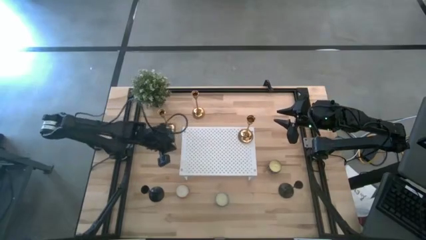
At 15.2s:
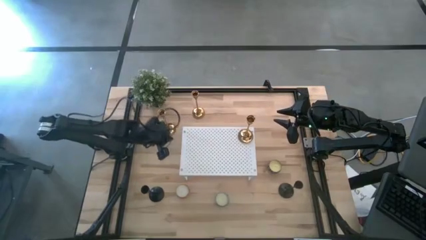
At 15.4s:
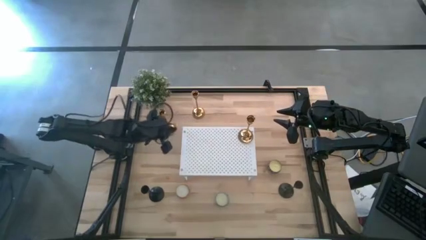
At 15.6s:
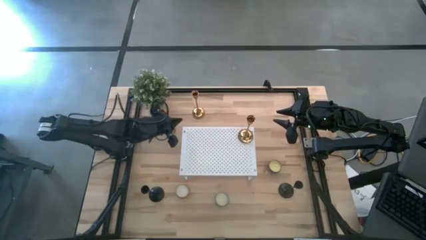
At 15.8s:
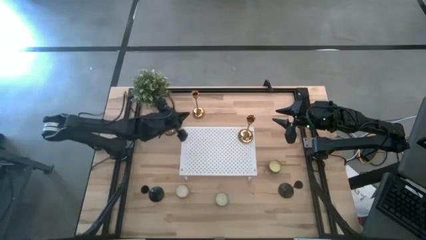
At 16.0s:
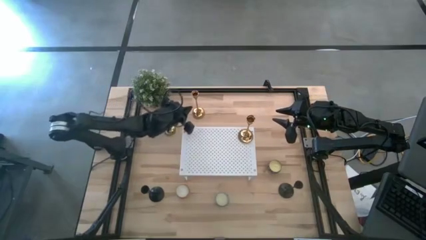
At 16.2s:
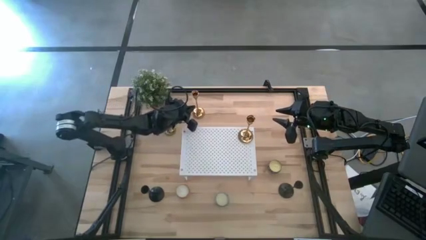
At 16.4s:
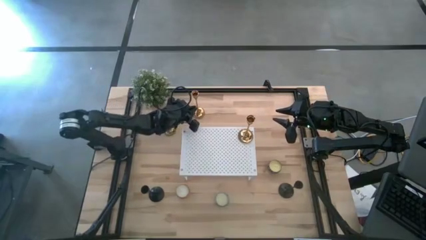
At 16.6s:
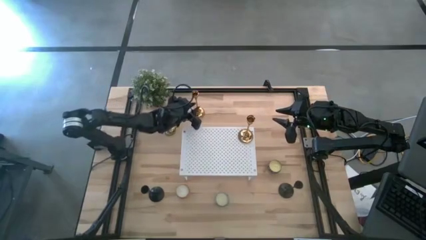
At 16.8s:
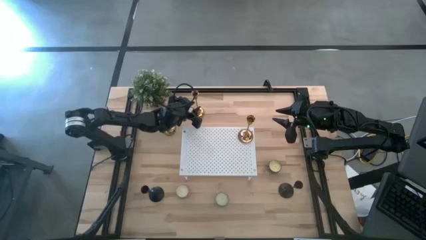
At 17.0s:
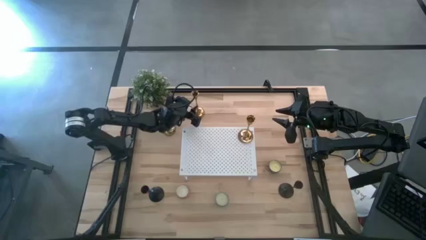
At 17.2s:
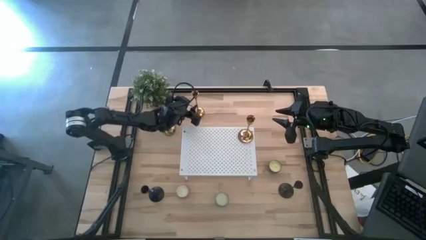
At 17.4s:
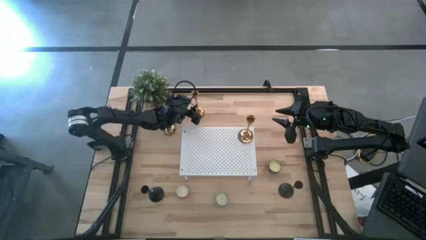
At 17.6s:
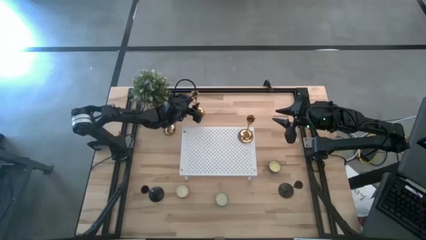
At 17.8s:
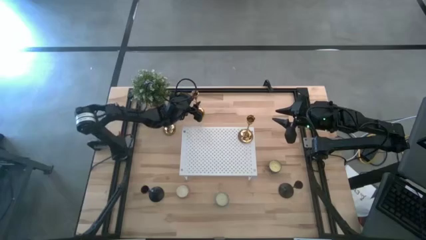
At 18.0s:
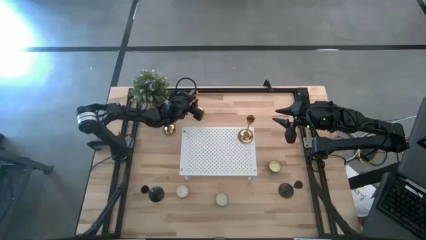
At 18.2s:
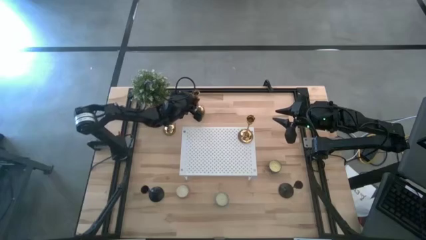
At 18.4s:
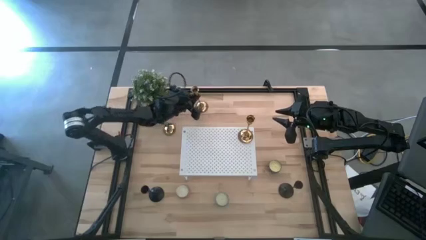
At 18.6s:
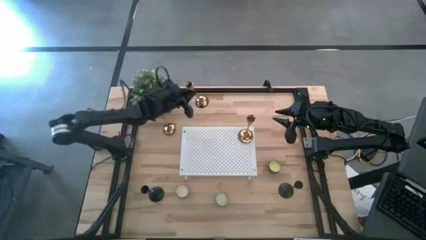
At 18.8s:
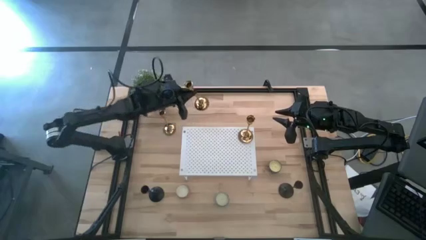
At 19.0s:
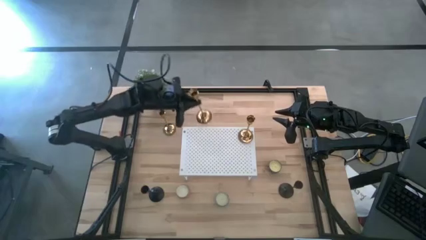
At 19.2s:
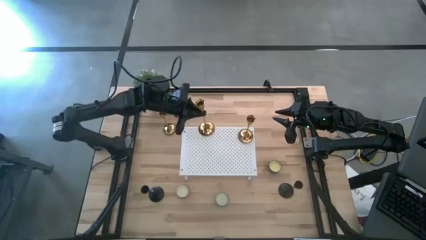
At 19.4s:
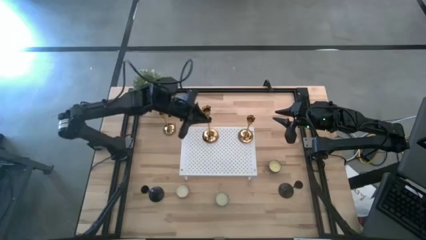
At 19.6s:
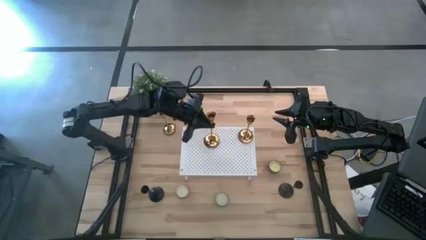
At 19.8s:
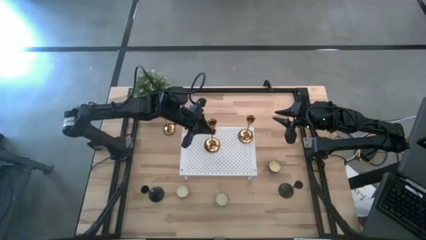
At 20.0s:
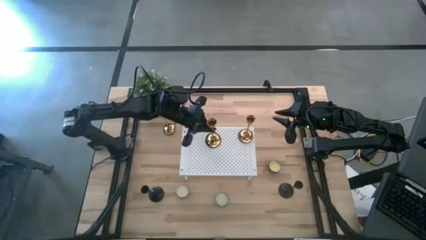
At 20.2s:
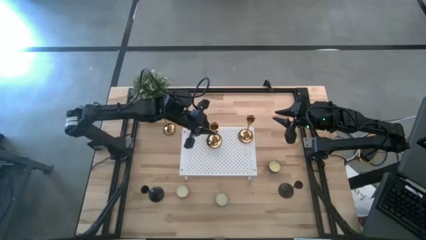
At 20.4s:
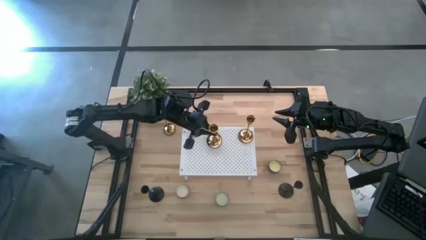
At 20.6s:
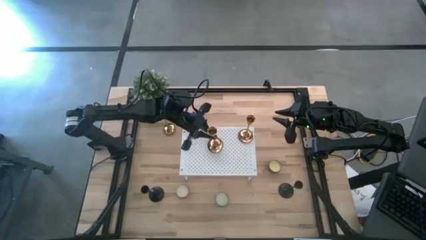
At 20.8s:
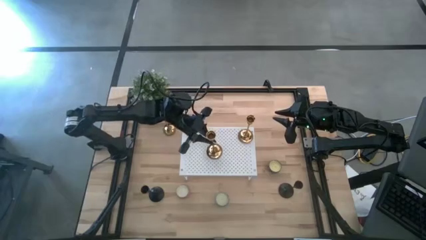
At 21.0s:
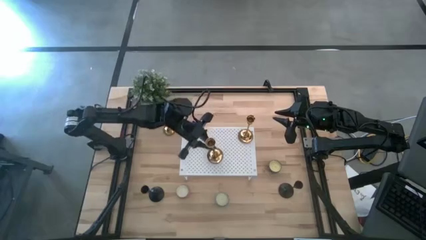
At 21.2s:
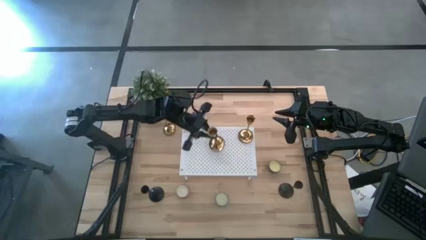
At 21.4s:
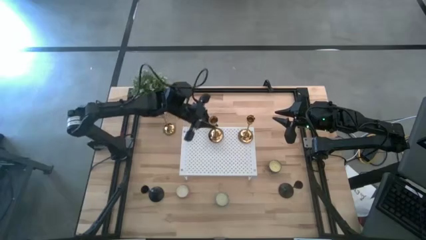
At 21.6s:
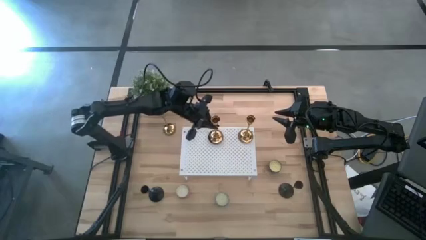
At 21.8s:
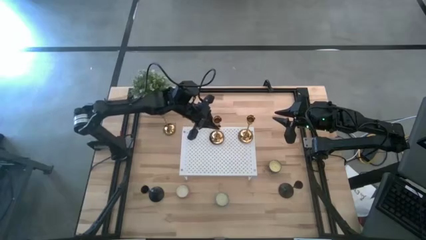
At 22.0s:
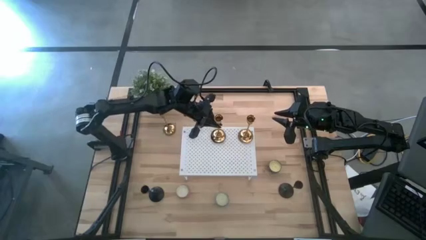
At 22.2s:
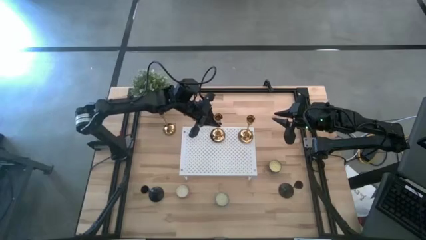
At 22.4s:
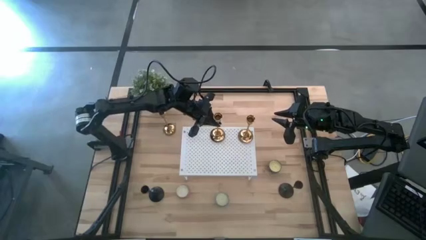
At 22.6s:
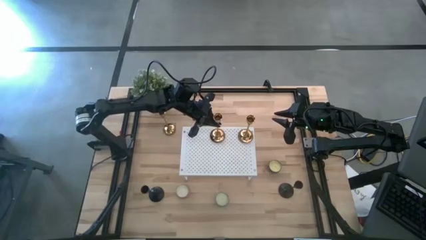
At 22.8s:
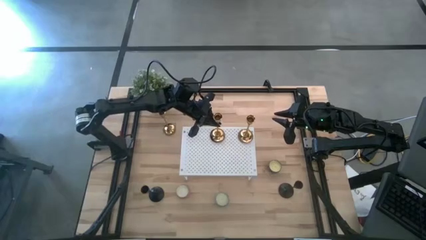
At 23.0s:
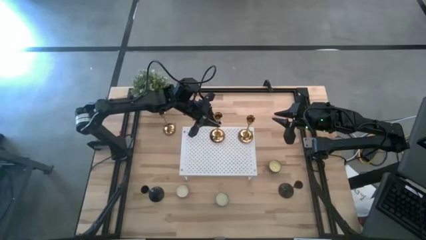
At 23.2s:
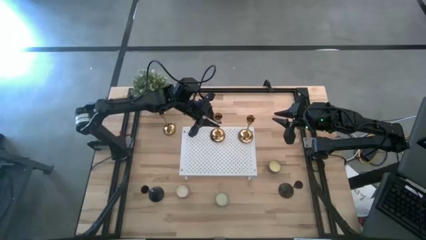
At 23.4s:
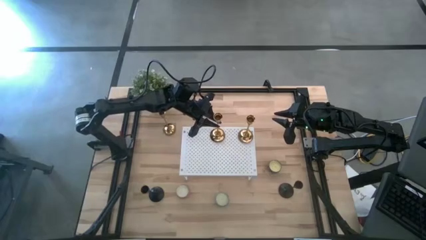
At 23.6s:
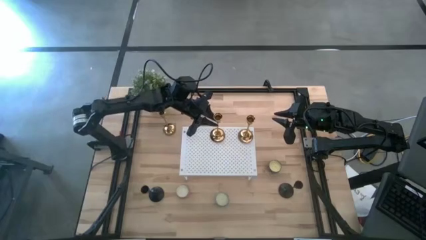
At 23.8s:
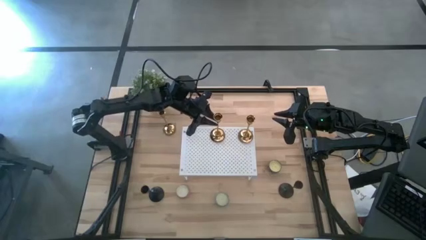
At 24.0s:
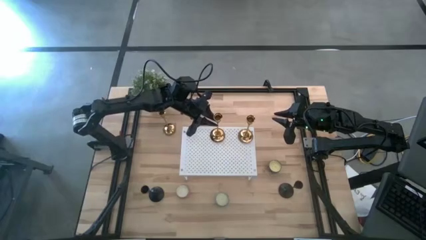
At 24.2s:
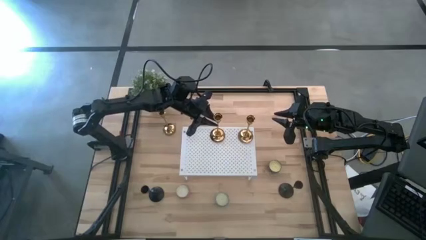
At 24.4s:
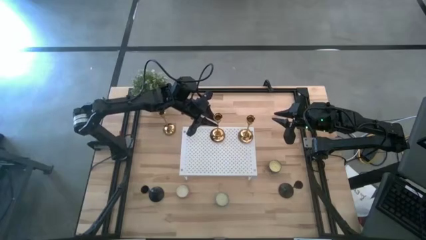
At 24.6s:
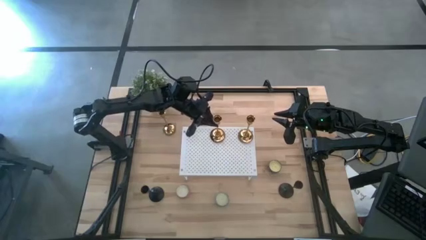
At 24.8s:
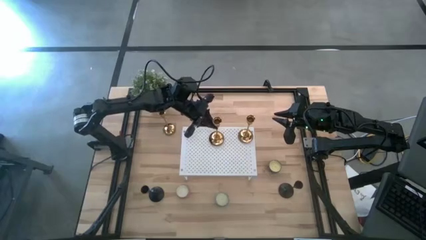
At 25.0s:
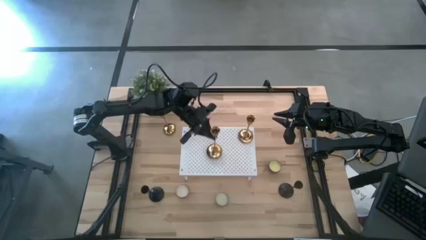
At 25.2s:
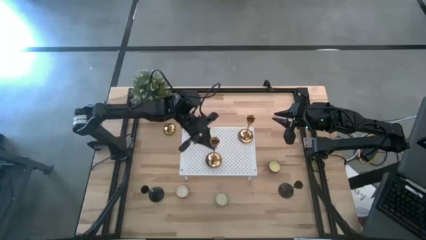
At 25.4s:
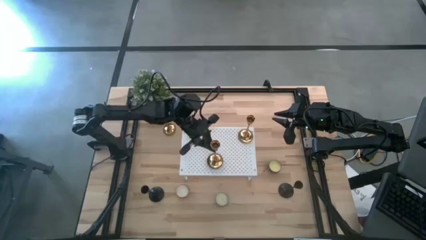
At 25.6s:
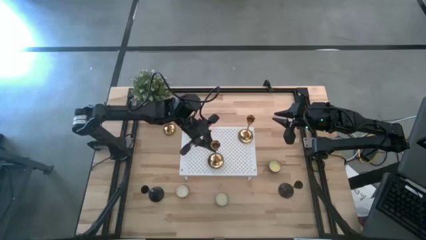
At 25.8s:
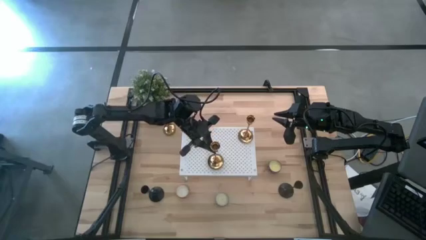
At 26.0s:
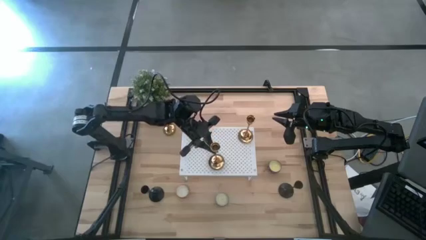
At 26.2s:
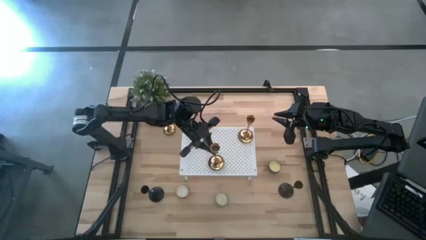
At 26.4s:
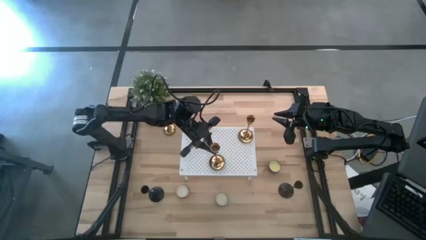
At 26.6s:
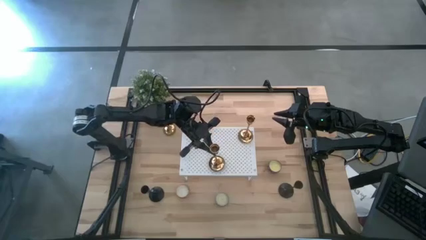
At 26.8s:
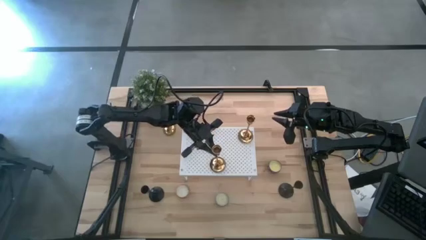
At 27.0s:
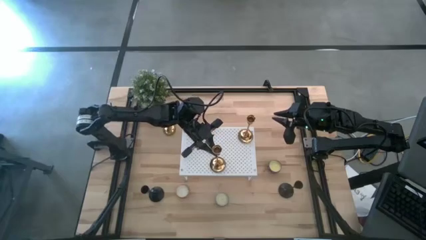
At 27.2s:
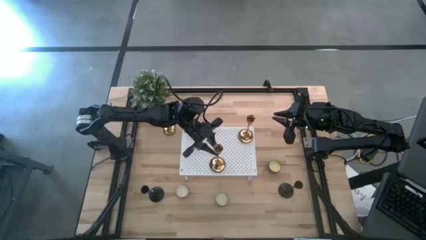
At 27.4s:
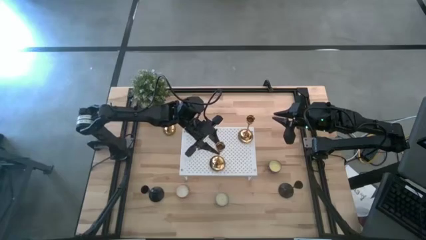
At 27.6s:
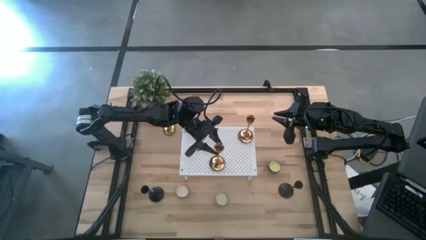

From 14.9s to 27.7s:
Task: Pick & Place candle stick holders
Put the top right golden candle holder on the shelf

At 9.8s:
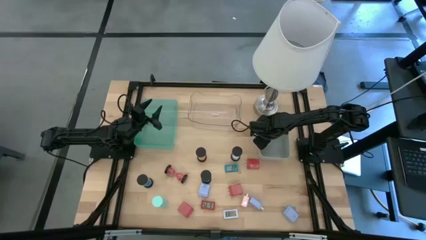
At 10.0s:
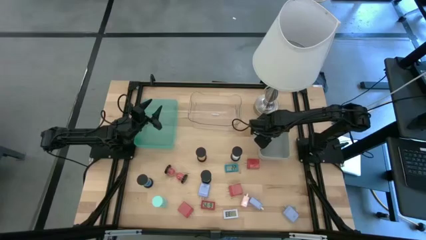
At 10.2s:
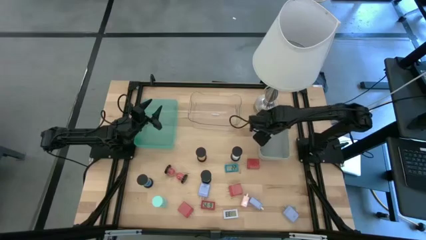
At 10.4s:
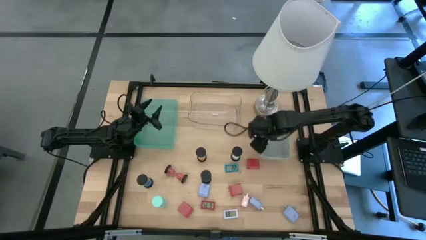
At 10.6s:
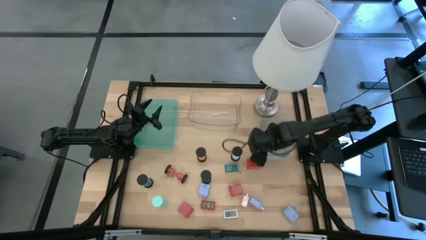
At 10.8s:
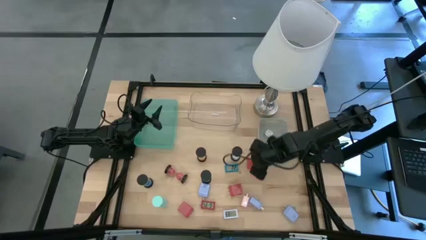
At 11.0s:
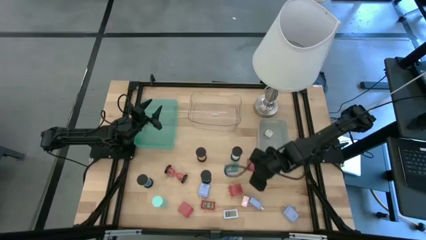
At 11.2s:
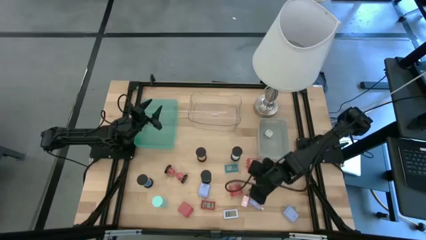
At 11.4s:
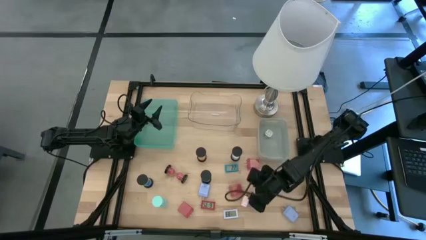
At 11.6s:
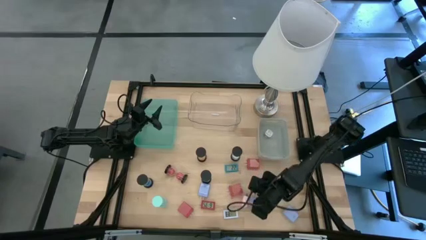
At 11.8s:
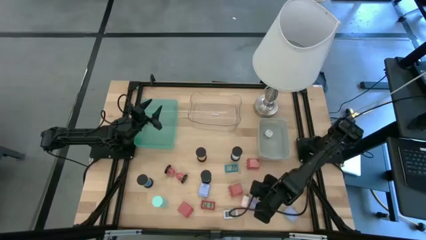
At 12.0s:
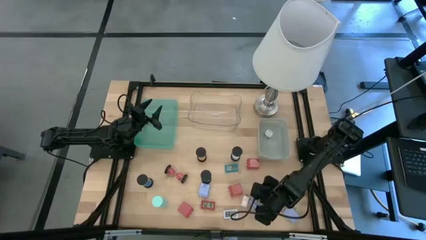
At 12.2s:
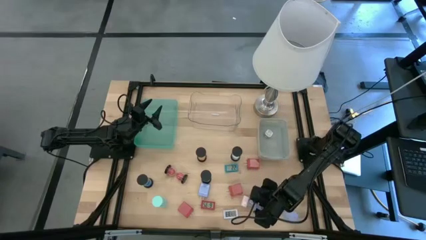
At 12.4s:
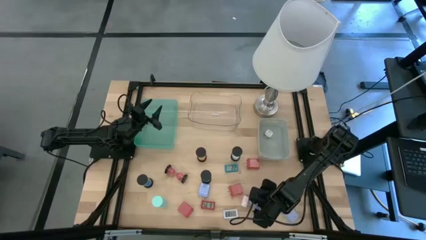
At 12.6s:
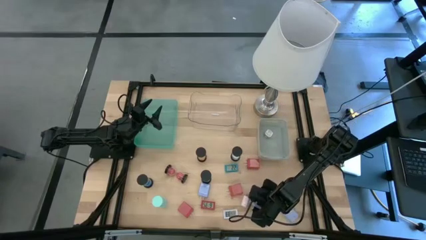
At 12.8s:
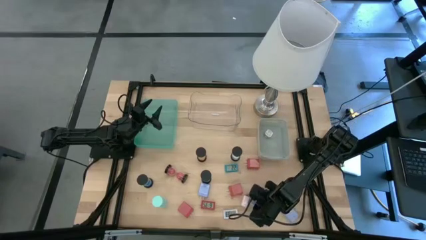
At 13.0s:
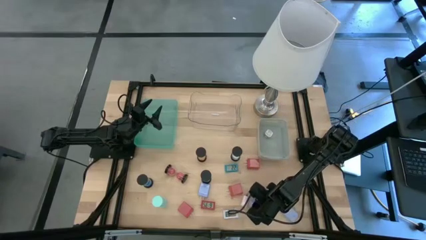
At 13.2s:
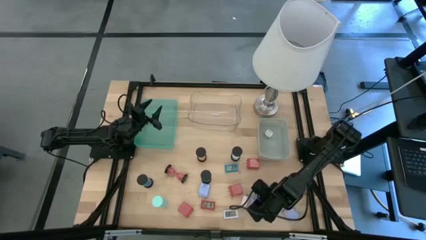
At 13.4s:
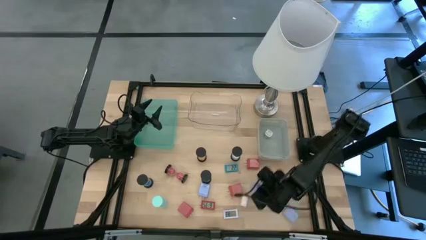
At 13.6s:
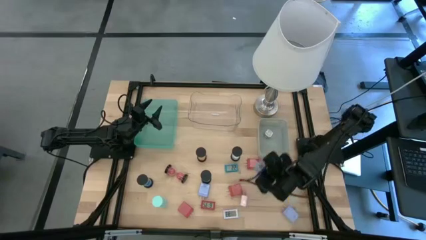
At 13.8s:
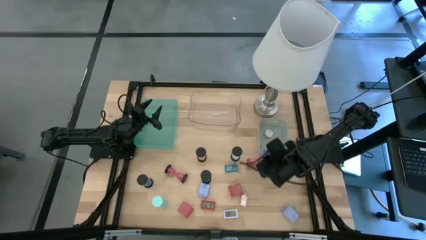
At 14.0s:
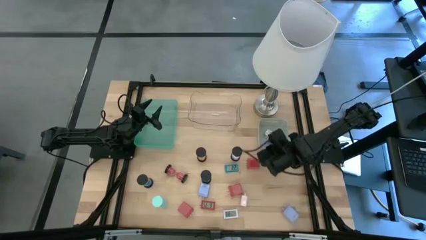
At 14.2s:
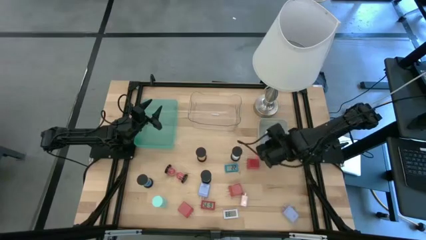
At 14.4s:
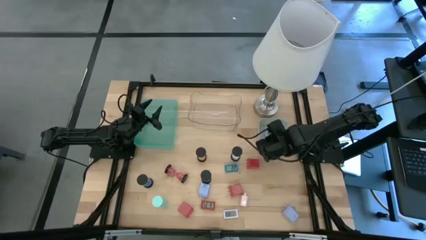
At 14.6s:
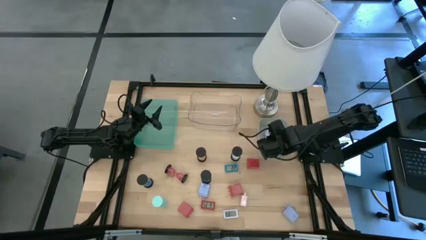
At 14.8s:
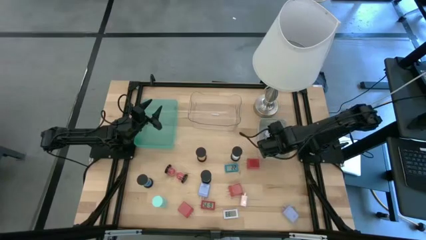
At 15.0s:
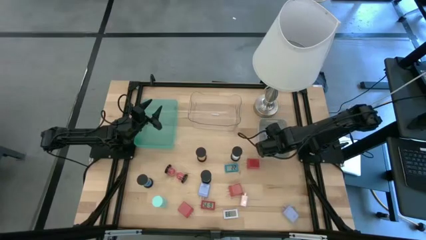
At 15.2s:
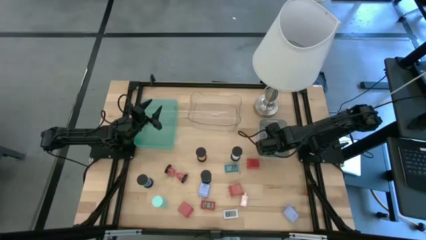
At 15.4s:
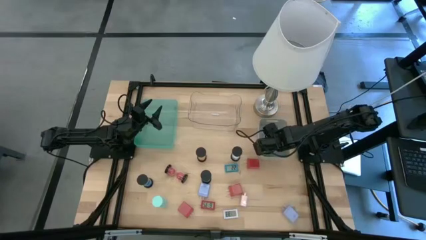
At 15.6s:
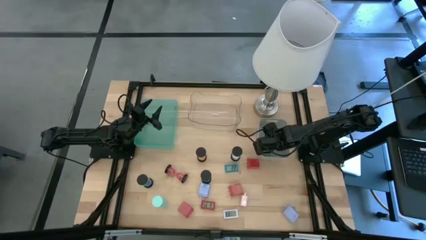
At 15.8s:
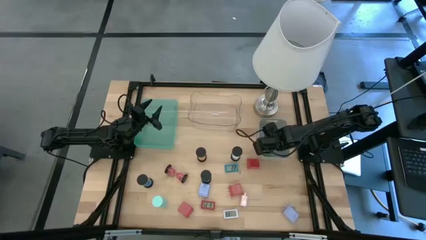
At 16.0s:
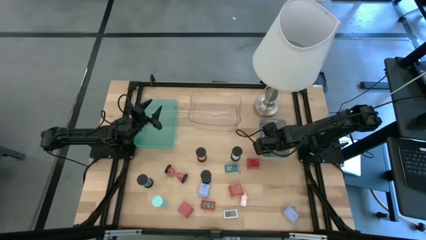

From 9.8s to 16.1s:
Task: Pick & Place Office items
Put the middle blue charger adapter into the gray bin
